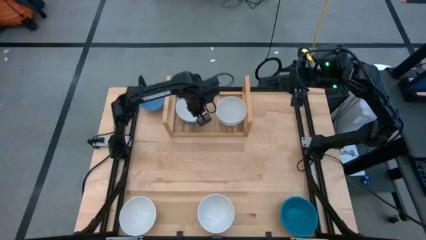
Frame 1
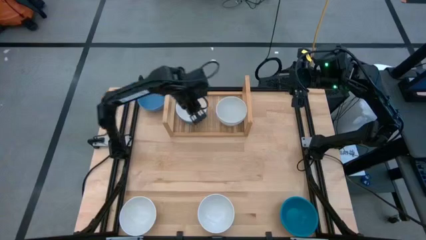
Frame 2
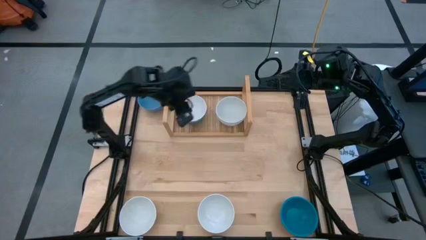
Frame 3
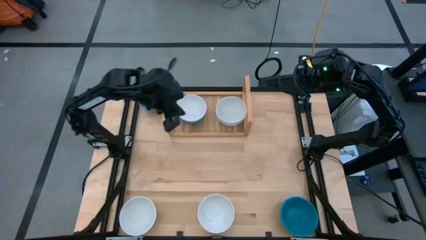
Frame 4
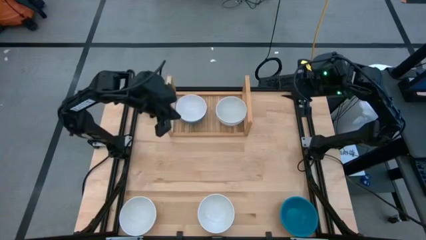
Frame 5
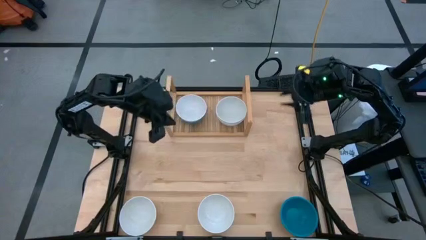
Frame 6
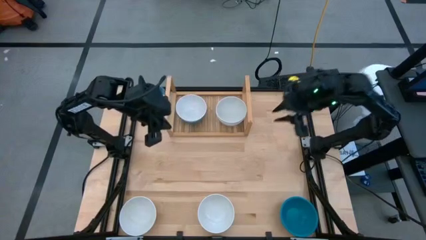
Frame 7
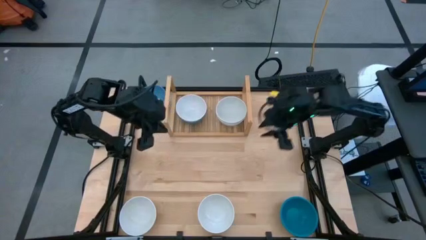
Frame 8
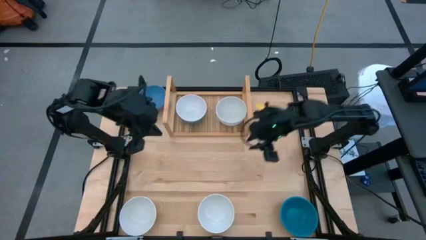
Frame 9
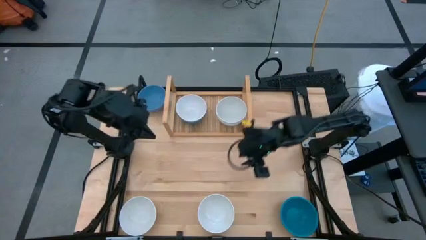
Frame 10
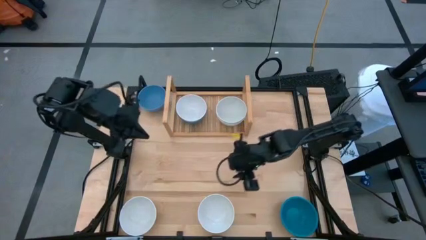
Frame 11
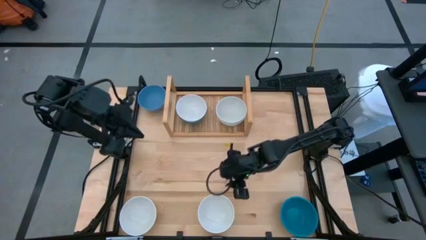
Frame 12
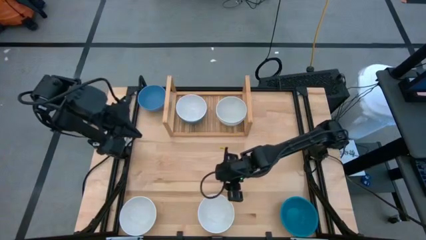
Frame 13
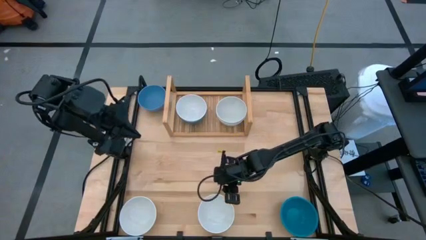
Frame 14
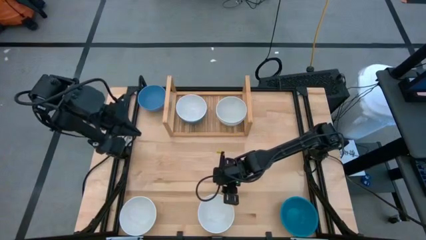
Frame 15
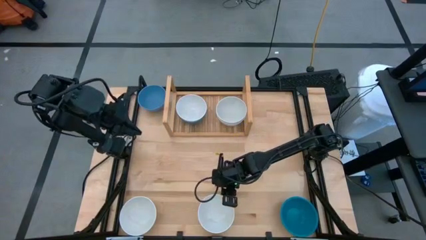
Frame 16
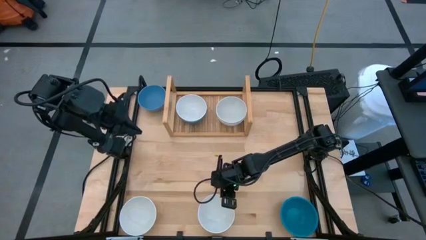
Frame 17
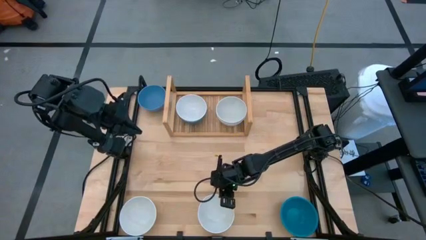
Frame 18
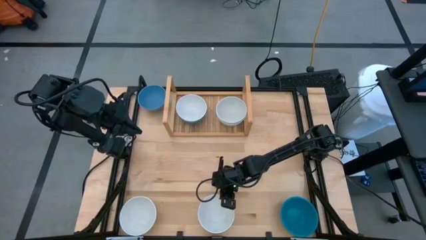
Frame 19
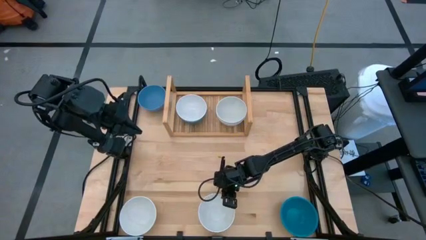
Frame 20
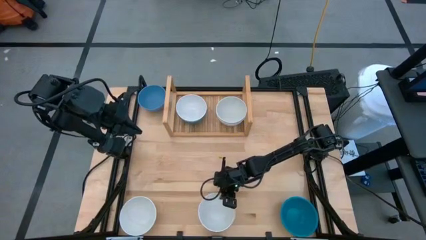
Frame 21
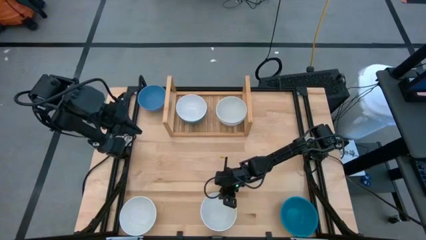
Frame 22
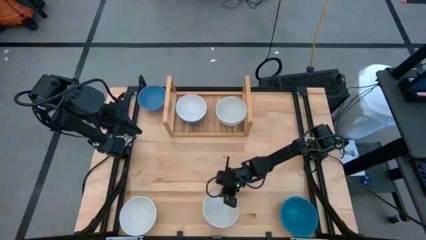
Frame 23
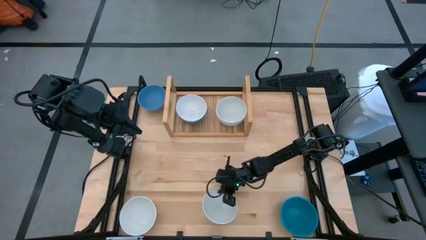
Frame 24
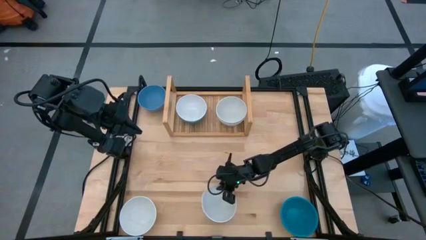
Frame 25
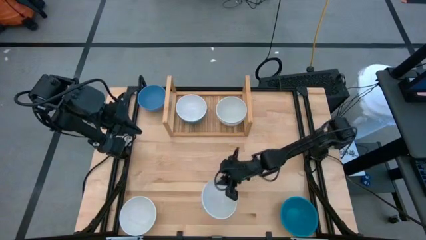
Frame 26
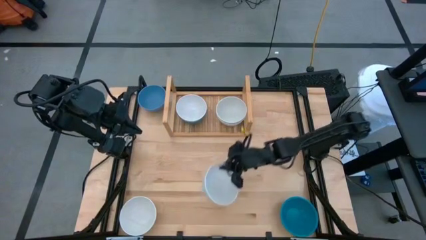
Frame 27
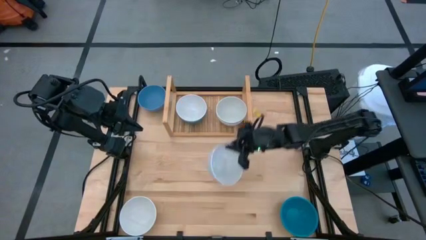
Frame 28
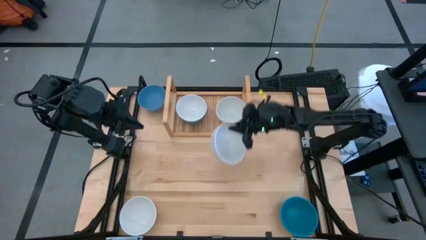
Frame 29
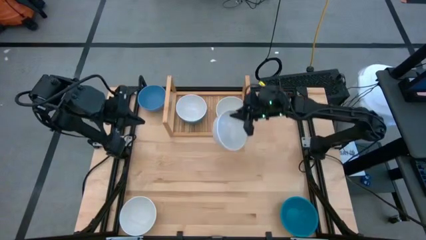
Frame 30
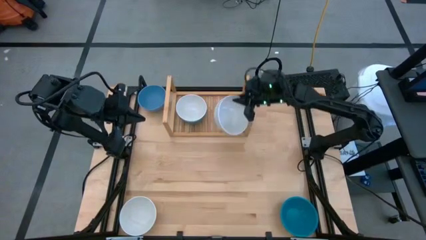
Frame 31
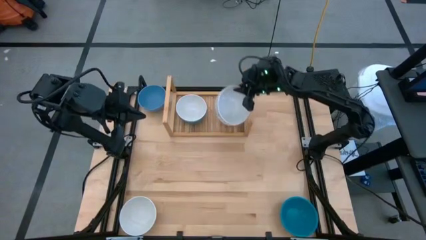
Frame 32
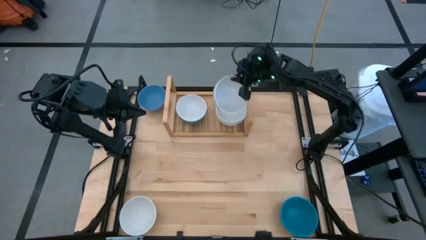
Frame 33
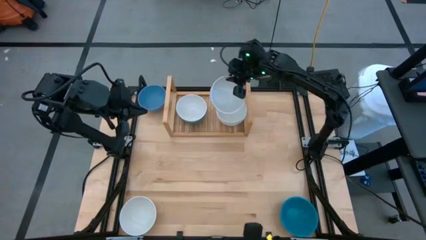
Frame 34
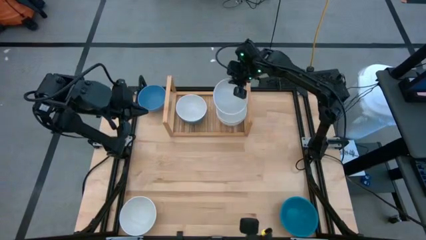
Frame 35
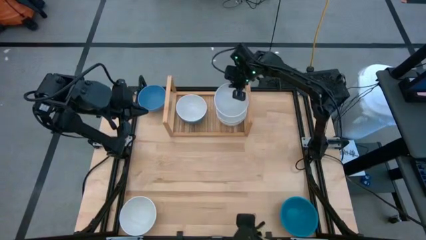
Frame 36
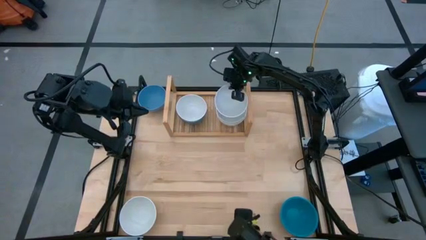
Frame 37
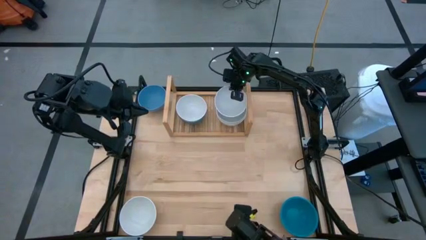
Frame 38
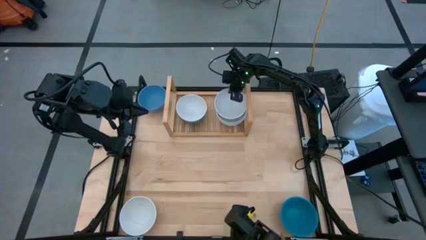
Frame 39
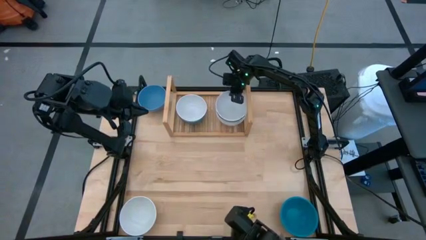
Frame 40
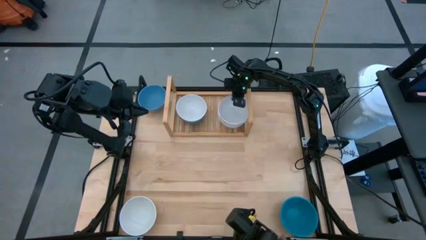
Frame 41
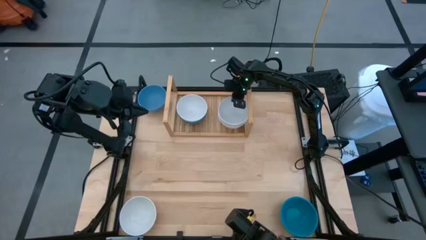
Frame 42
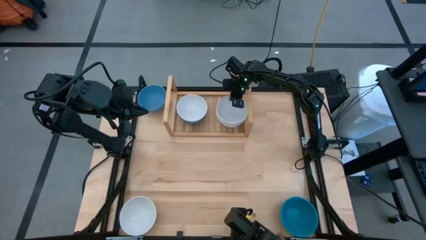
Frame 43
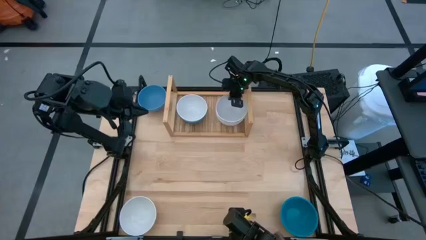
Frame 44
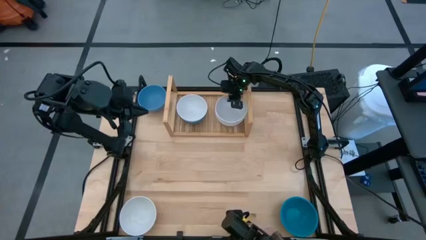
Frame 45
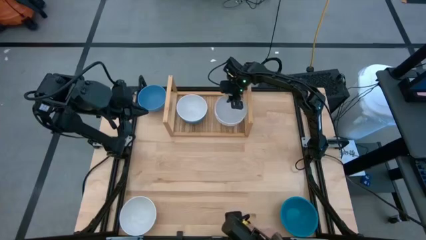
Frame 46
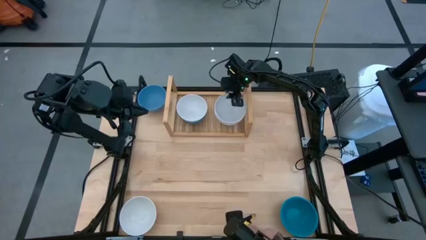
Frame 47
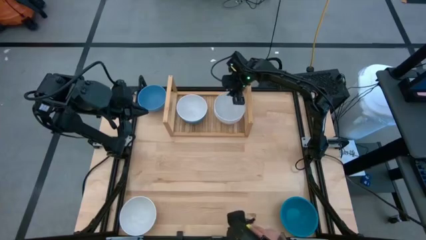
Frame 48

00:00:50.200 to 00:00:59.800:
Task: Place and stack bowls onto a shelf
Stack the white bowl on top of the white bowl on the shelf

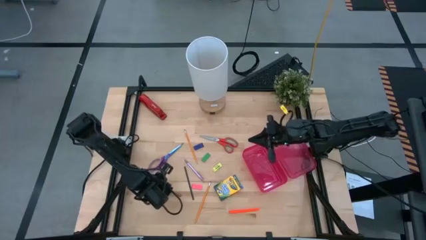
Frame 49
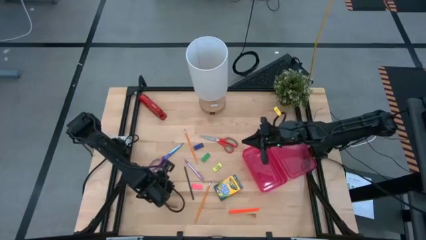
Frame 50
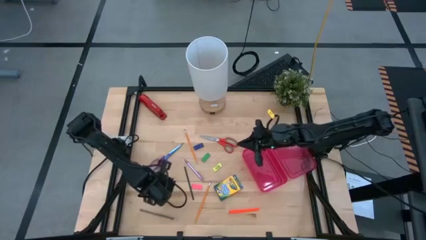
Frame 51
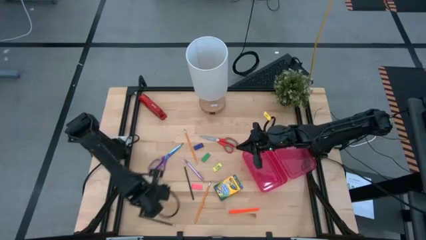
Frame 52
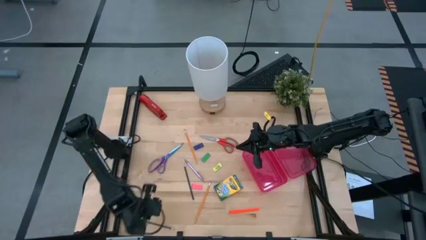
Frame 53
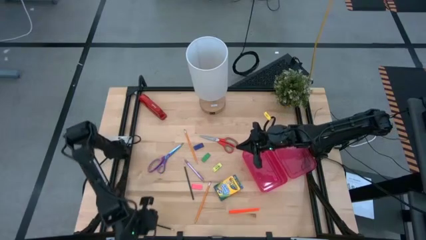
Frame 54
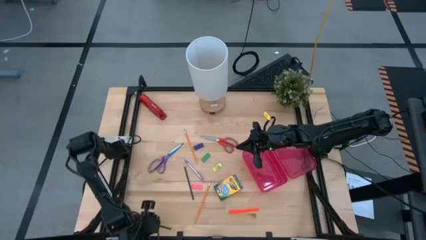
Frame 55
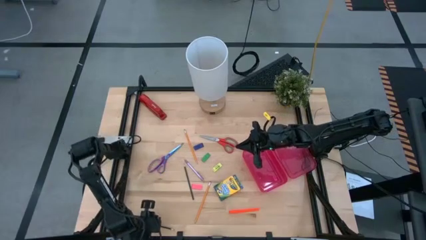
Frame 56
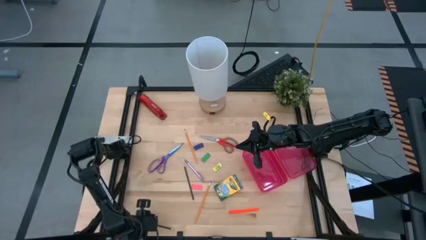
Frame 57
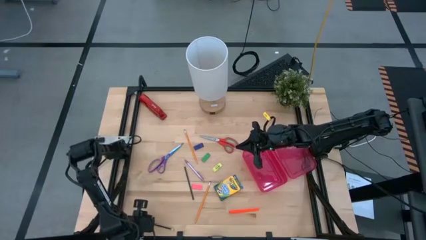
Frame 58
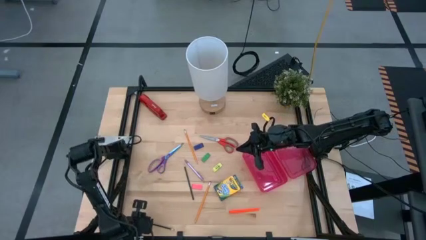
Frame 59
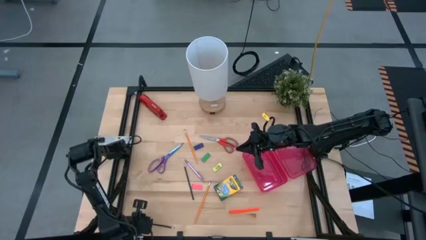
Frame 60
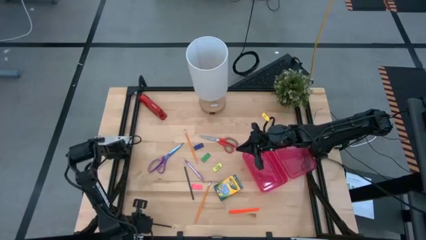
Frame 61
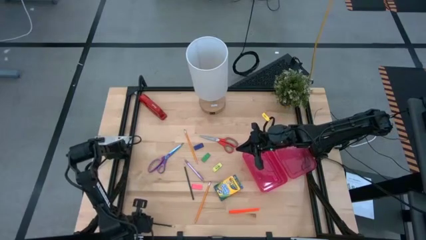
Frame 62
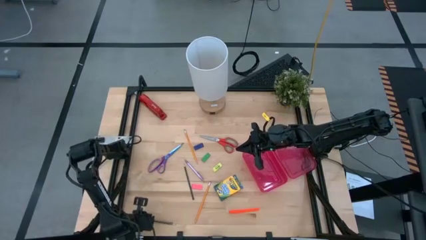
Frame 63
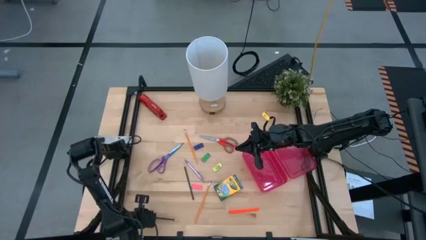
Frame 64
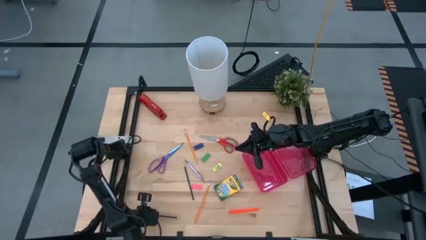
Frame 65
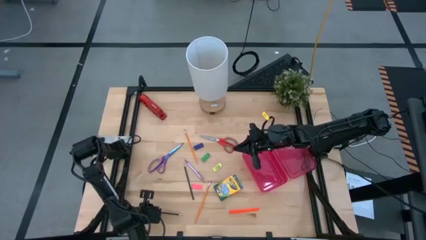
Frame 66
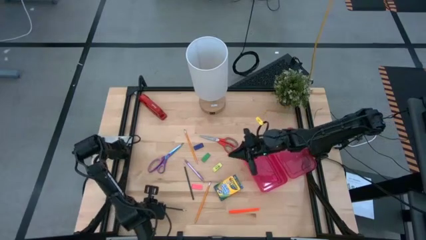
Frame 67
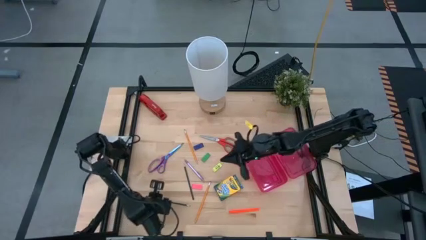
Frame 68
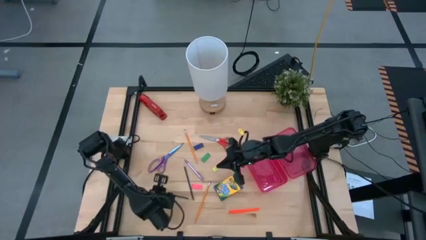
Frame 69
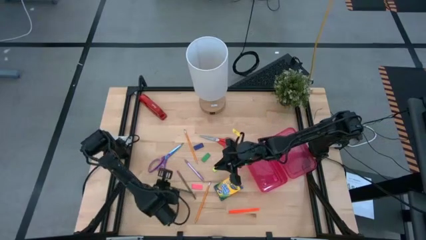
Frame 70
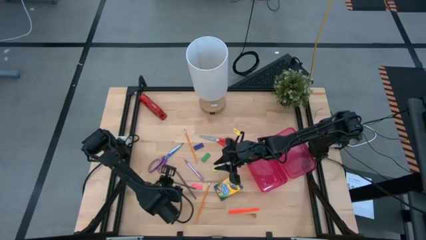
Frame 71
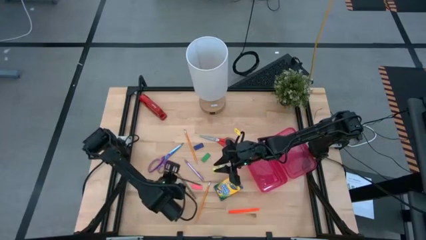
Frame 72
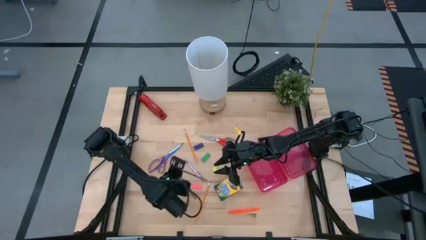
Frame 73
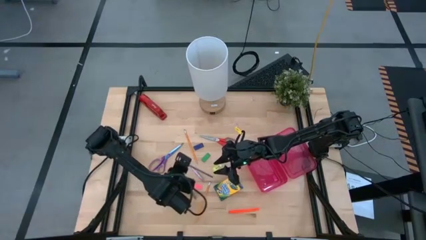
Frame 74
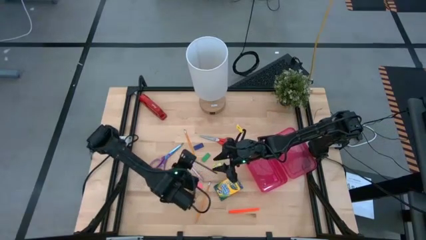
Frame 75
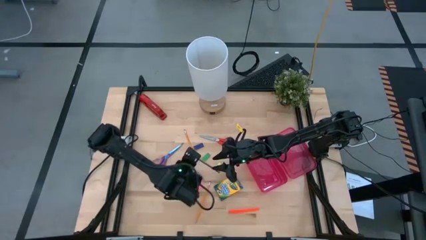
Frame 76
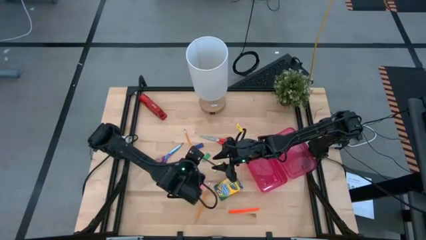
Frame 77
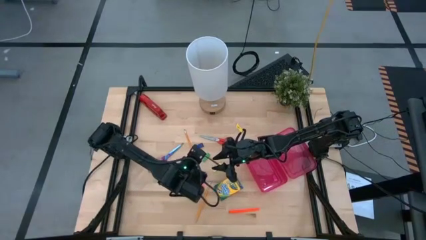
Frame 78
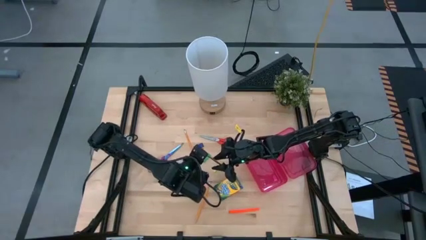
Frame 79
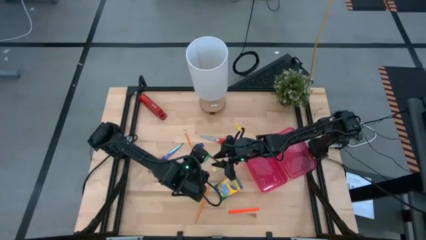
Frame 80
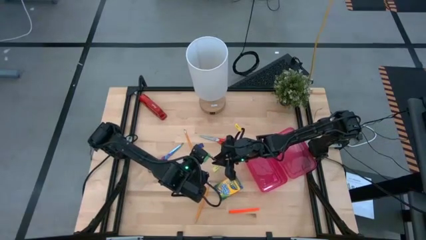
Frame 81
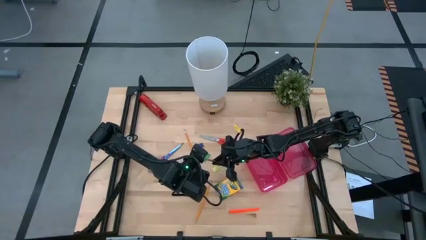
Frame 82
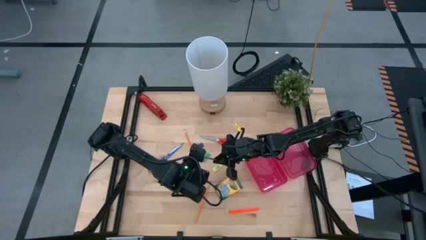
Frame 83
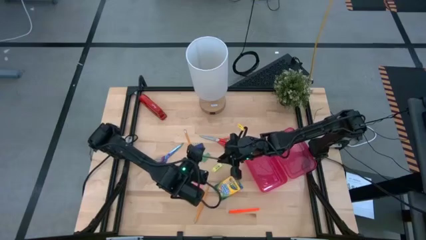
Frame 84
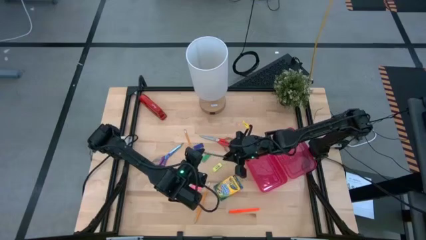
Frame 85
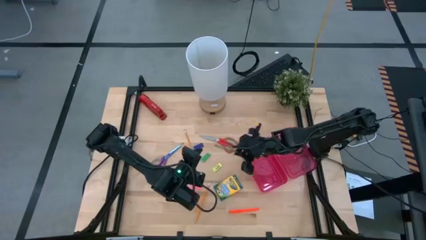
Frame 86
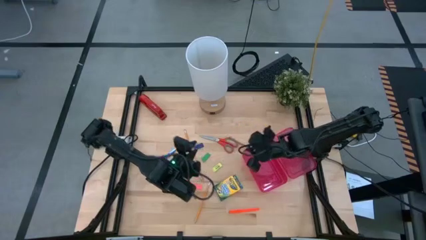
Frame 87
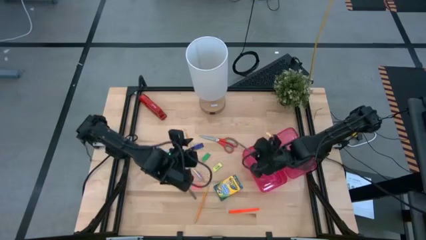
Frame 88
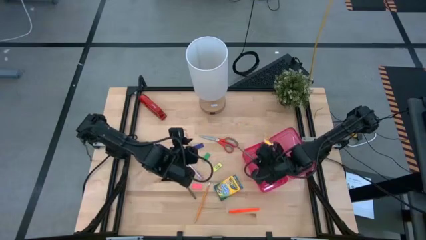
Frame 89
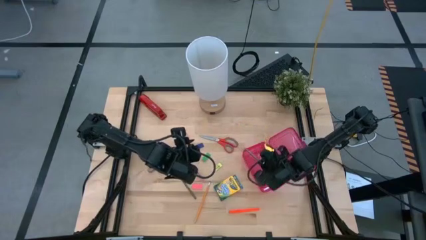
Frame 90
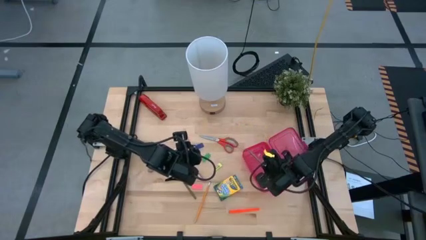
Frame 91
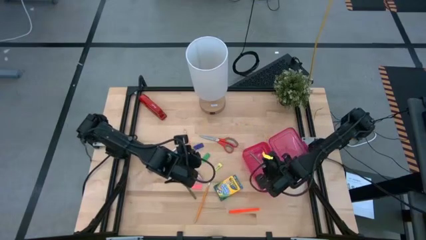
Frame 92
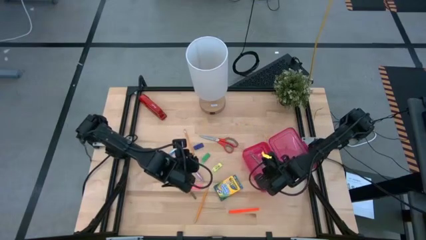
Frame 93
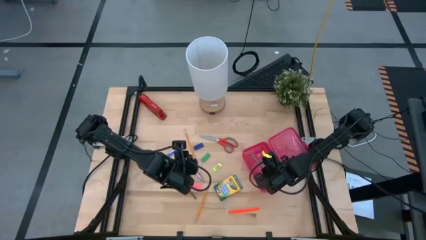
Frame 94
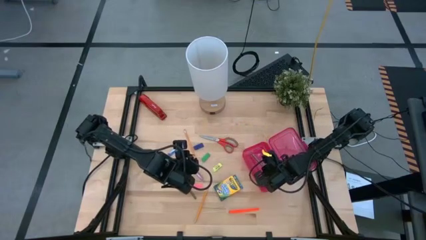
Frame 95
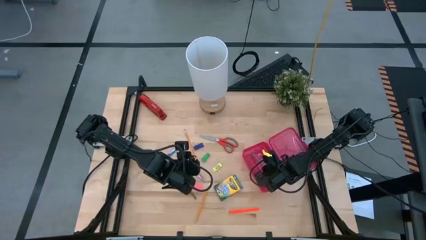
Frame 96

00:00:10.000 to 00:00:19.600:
Task: Pack school essentials
Put the left blue pencil into the pink supply box
